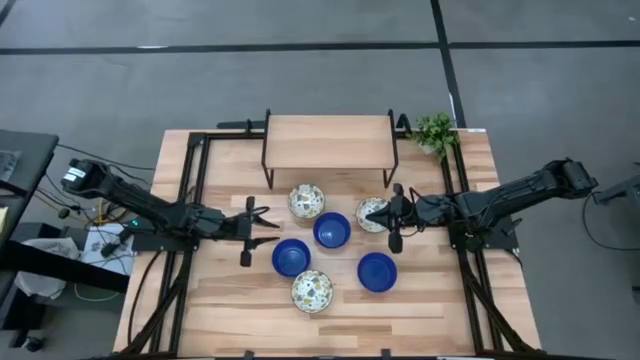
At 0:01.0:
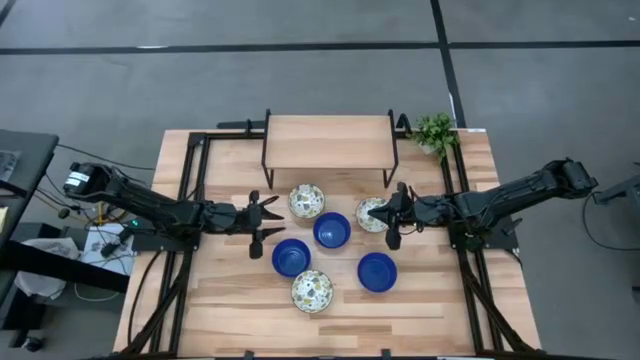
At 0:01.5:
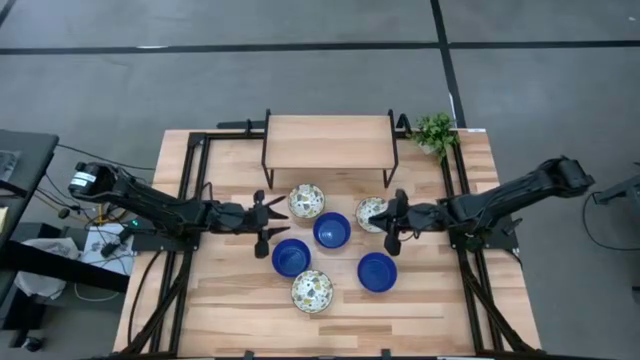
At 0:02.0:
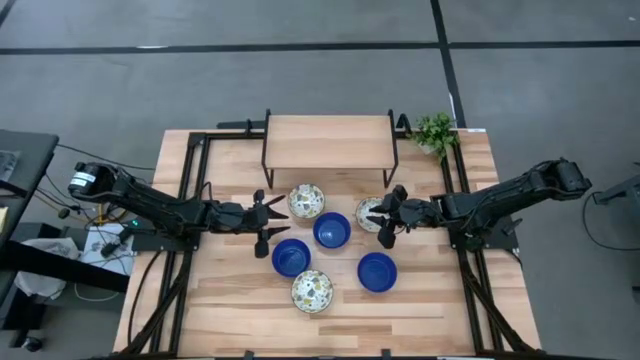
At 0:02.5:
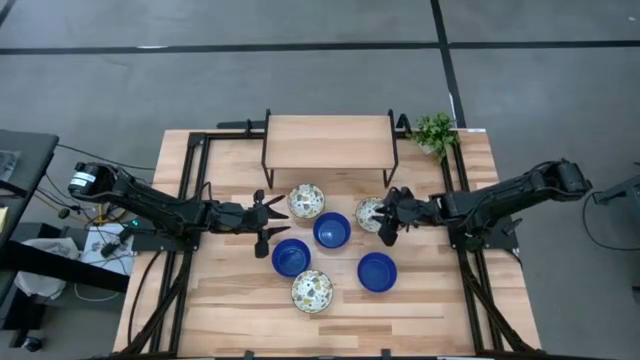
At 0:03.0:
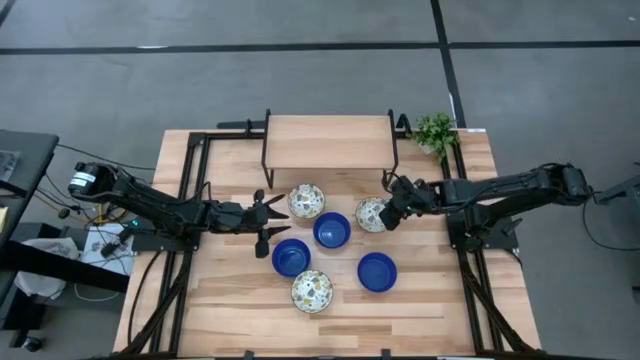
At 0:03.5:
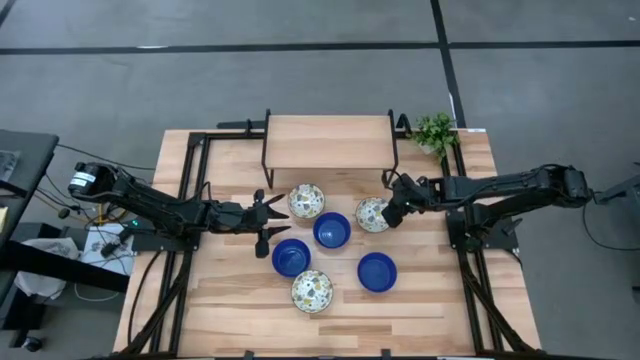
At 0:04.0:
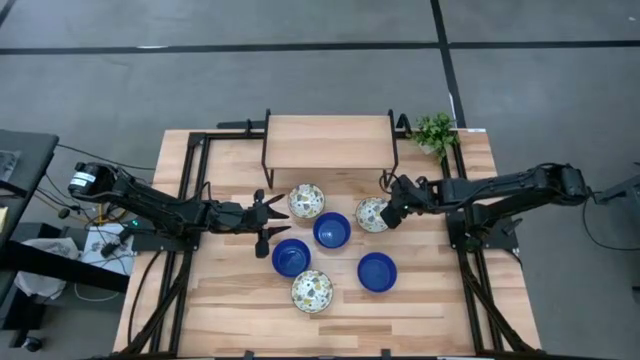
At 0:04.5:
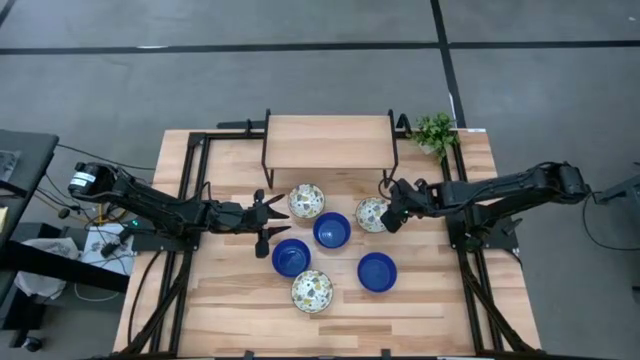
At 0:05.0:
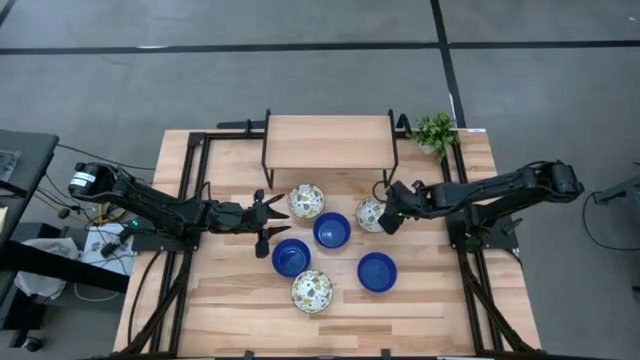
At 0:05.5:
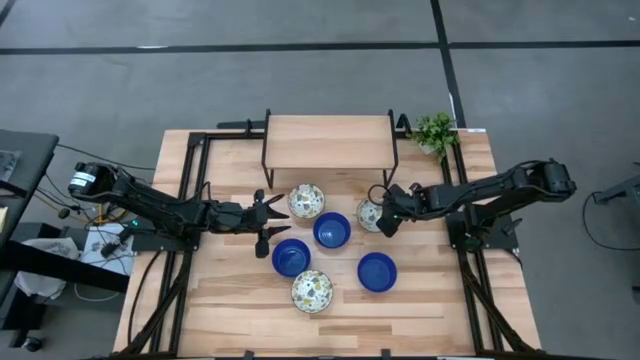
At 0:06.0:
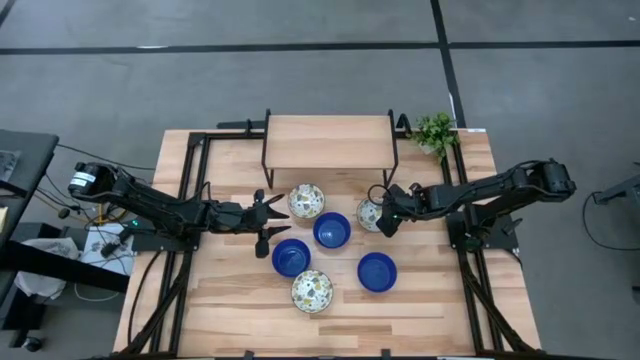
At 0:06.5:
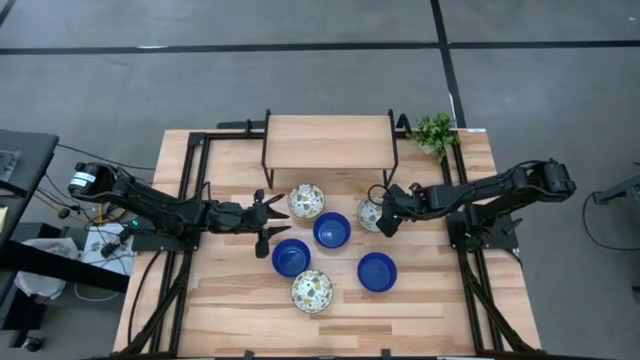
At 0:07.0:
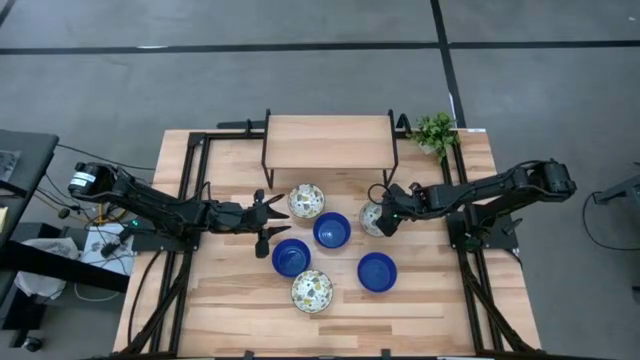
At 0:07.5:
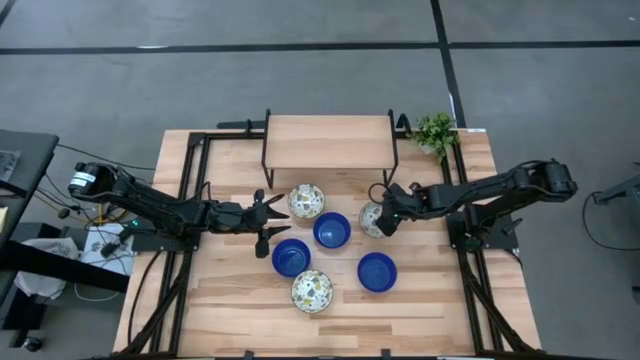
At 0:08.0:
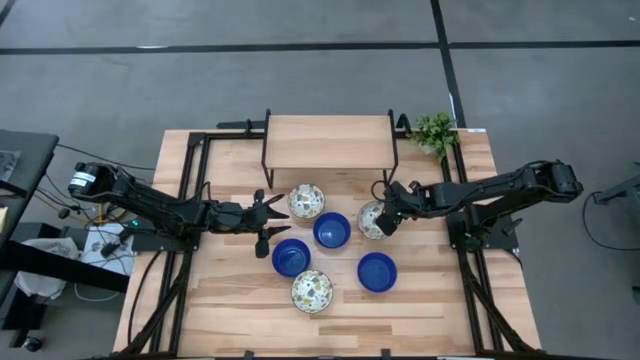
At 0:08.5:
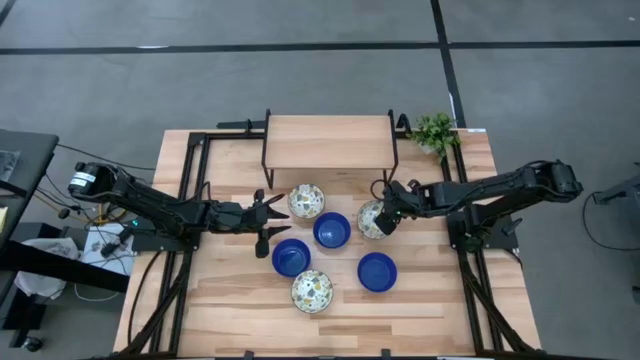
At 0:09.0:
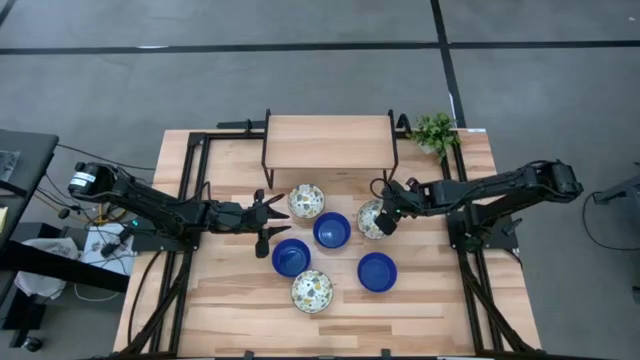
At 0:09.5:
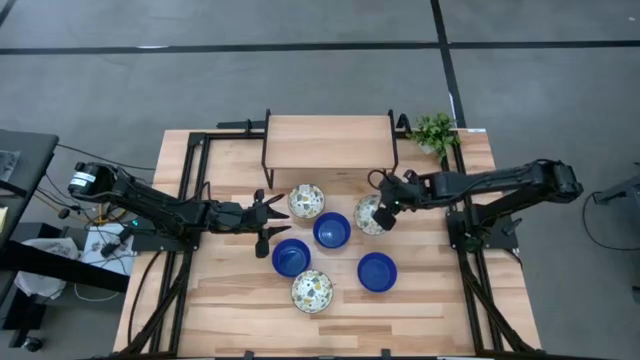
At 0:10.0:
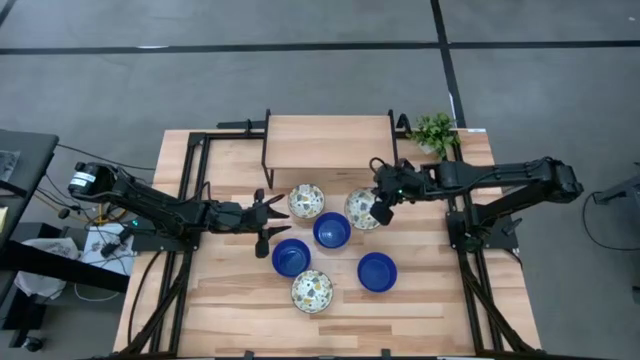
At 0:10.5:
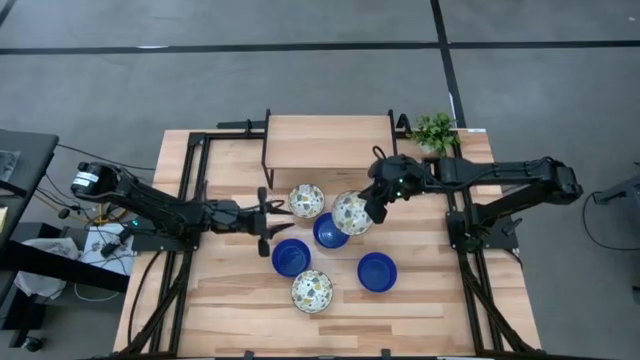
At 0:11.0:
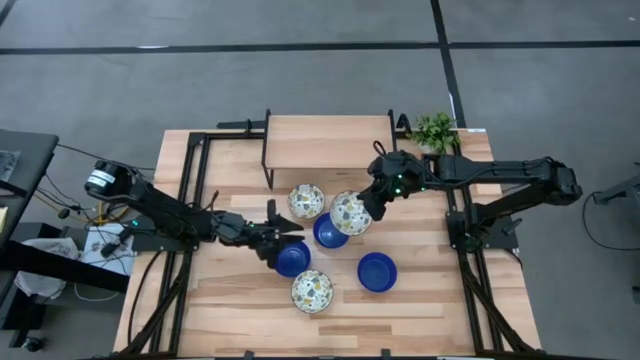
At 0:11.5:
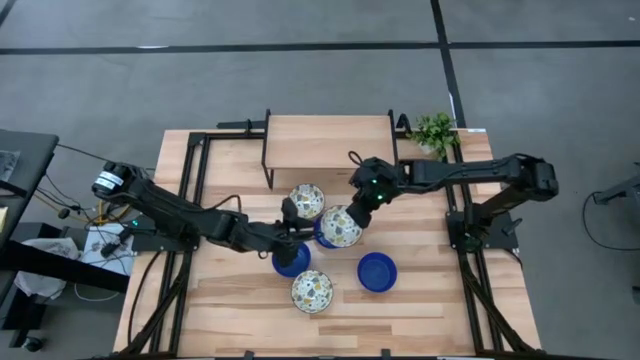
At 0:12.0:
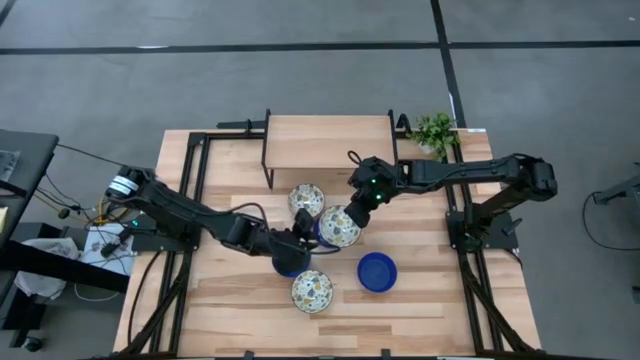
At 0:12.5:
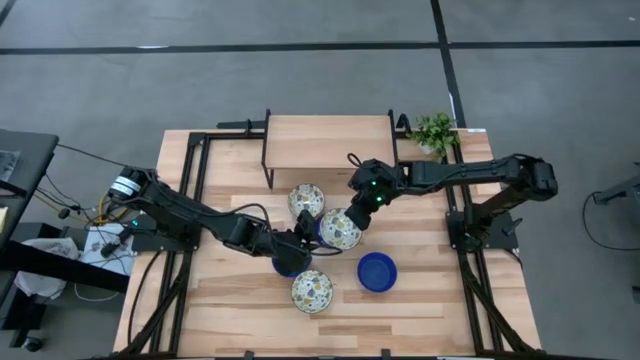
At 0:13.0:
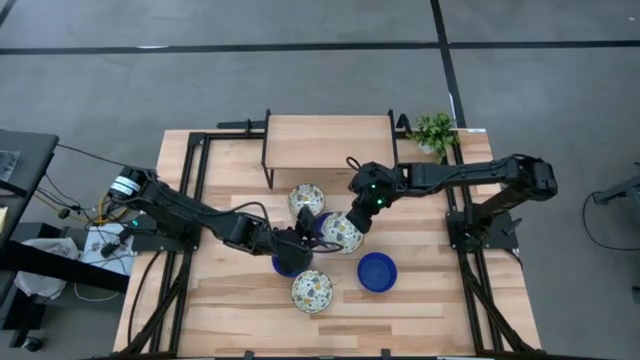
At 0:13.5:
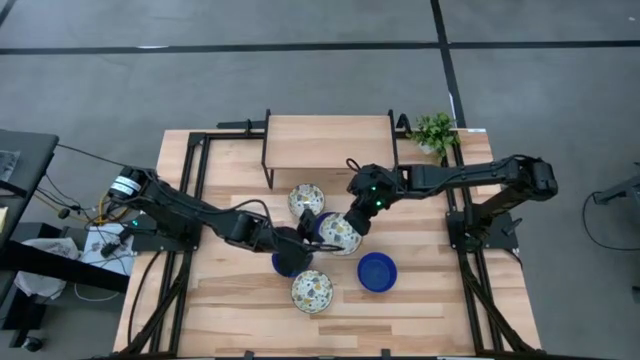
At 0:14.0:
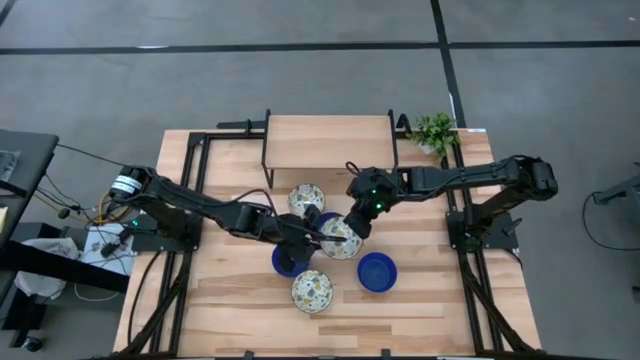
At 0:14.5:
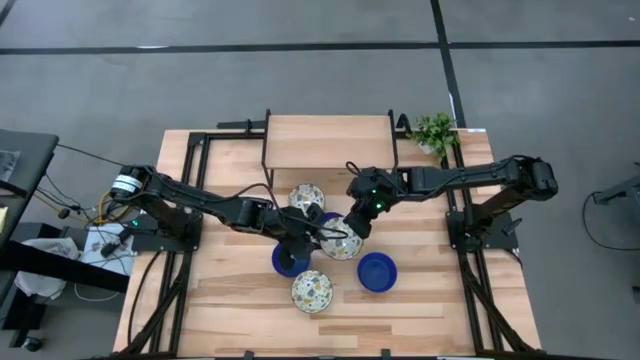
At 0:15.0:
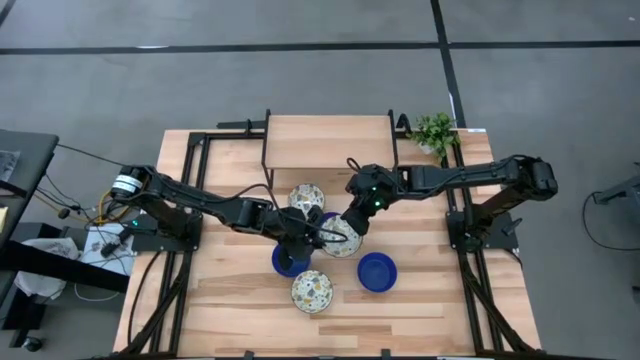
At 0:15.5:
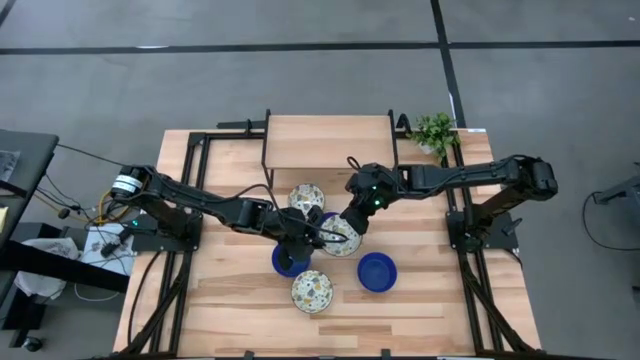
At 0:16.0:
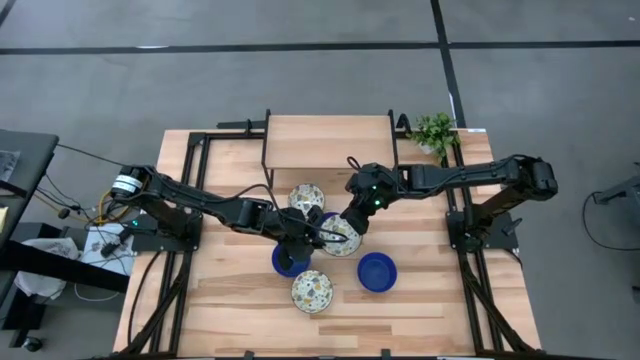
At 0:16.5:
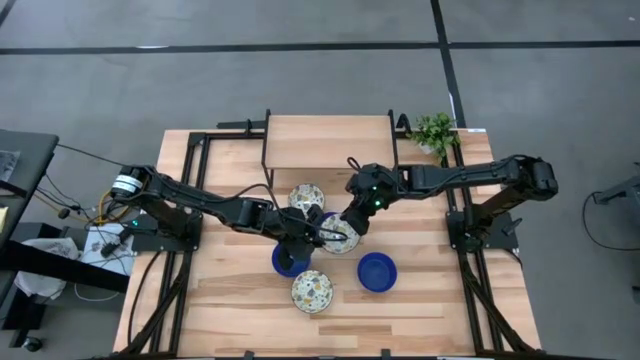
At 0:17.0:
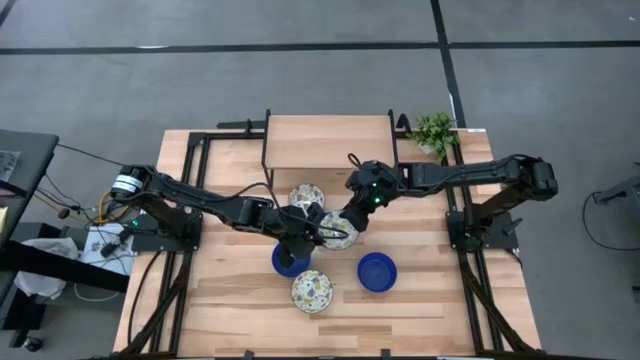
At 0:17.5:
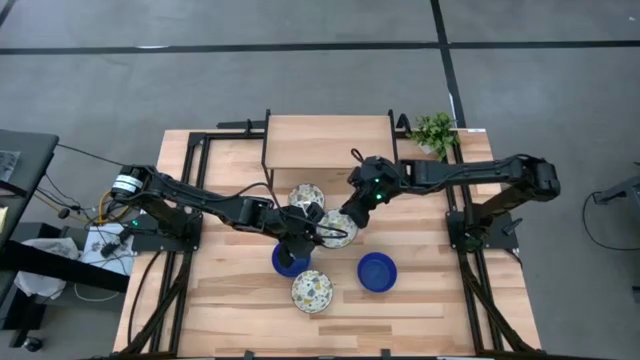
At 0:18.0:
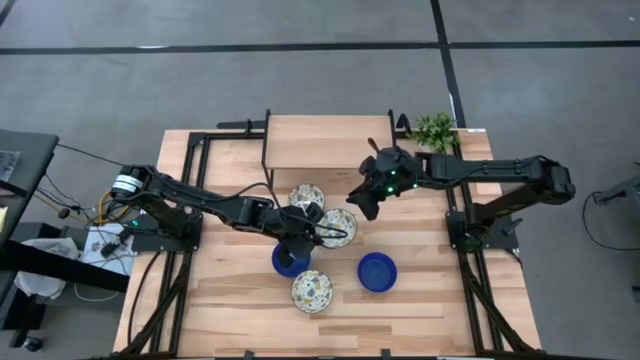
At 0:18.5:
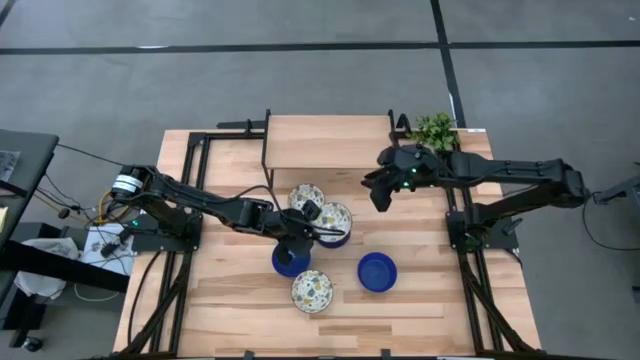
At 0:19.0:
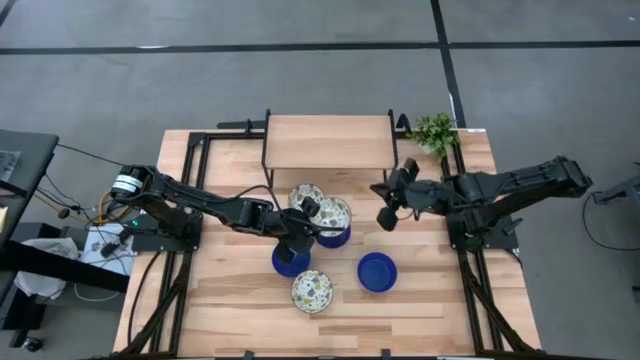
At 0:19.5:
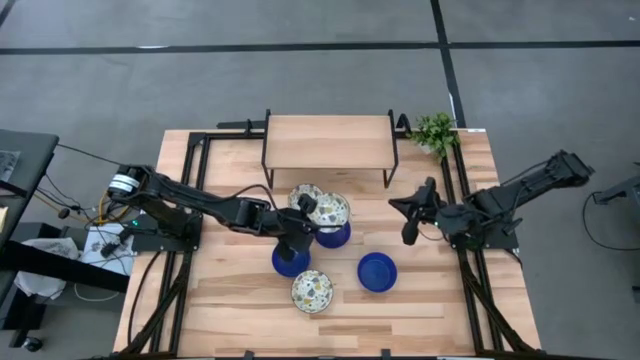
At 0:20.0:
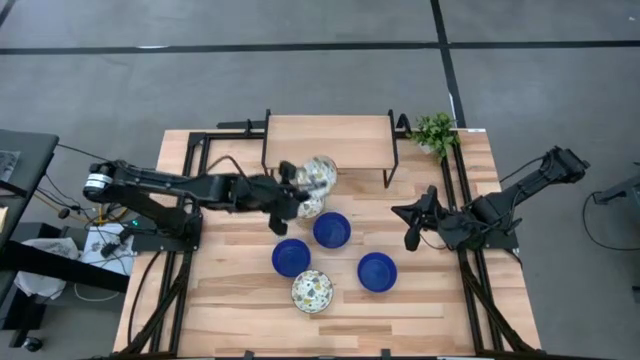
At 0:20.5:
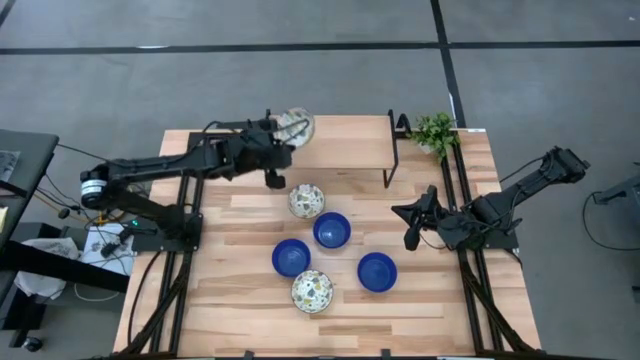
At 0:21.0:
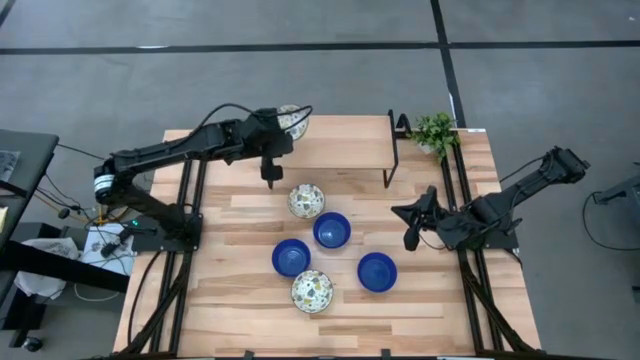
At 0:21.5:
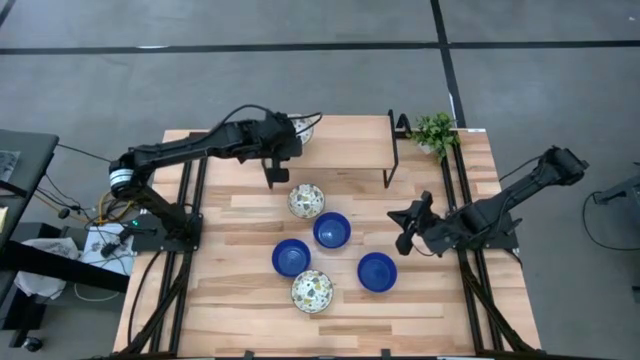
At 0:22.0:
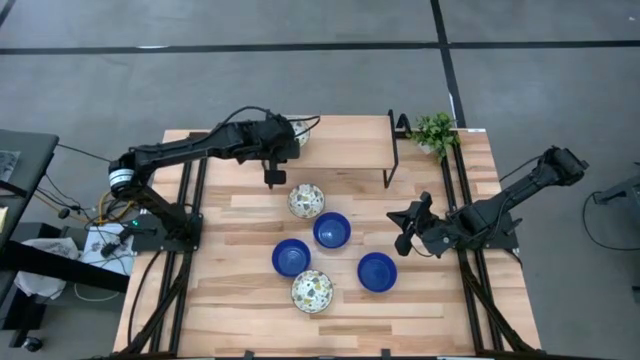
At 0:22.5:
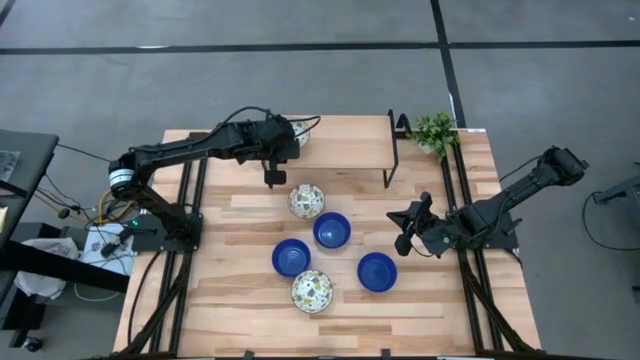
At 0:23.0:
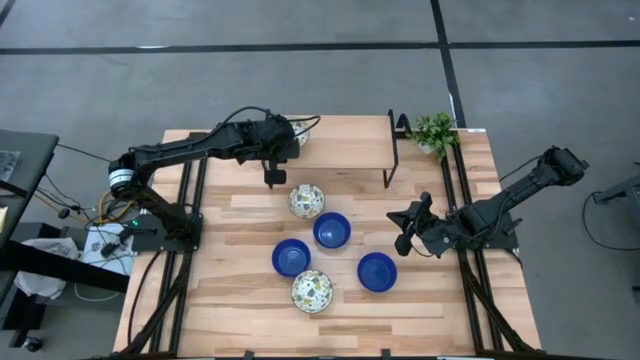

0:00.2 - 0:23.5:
Task: Pick & Place Mini bowls
Put the white patterned bowl on the shelf
